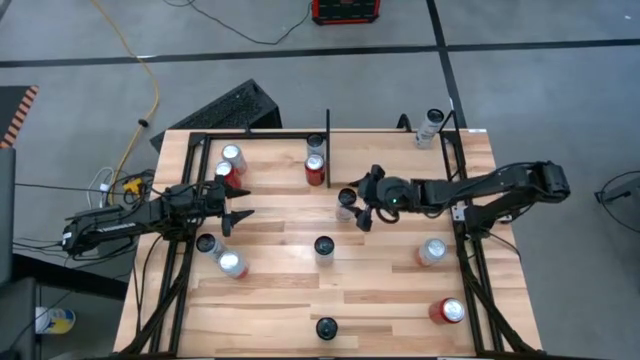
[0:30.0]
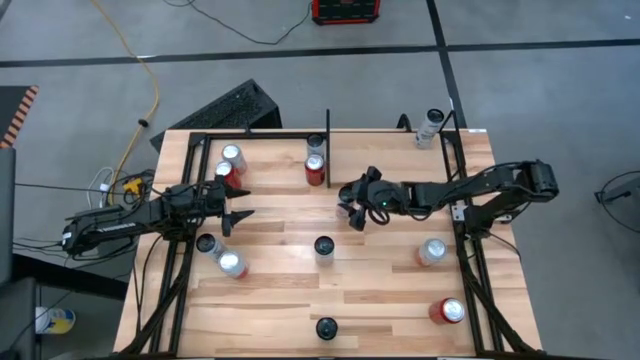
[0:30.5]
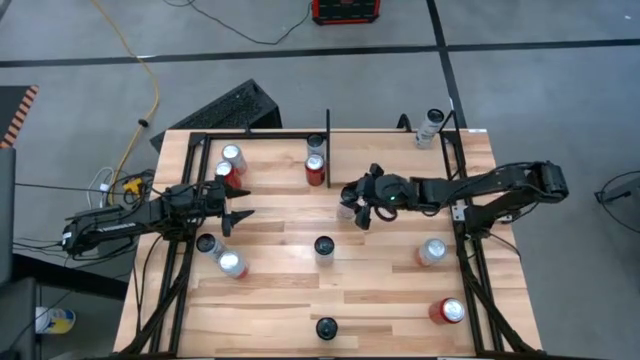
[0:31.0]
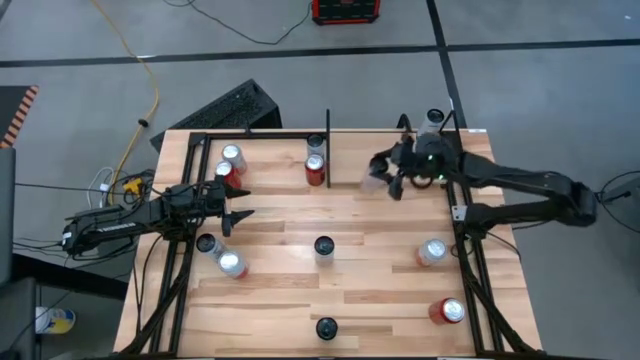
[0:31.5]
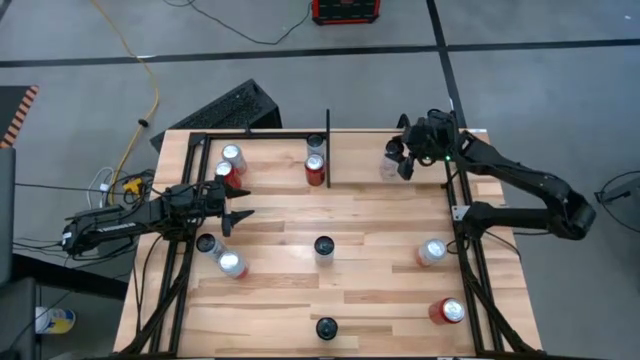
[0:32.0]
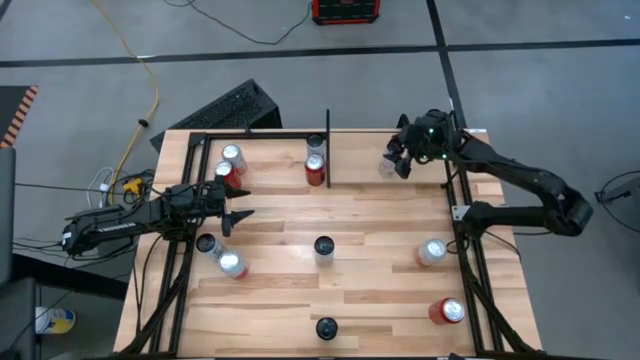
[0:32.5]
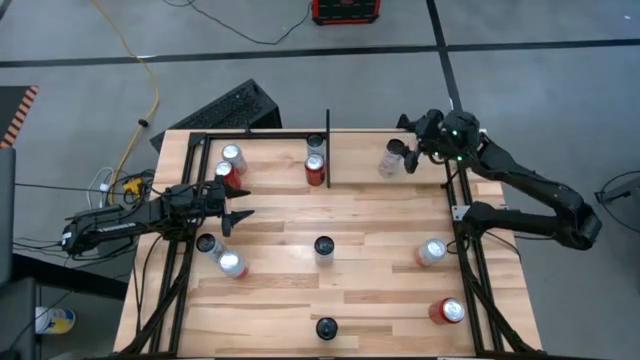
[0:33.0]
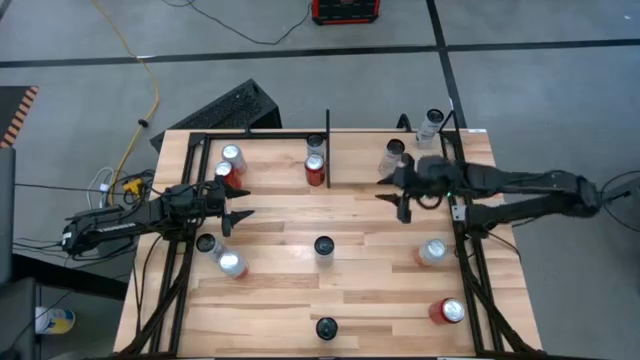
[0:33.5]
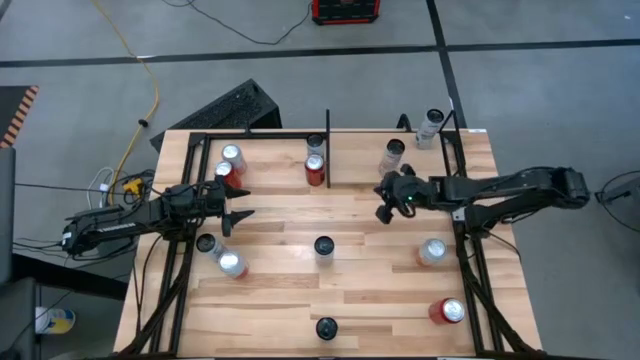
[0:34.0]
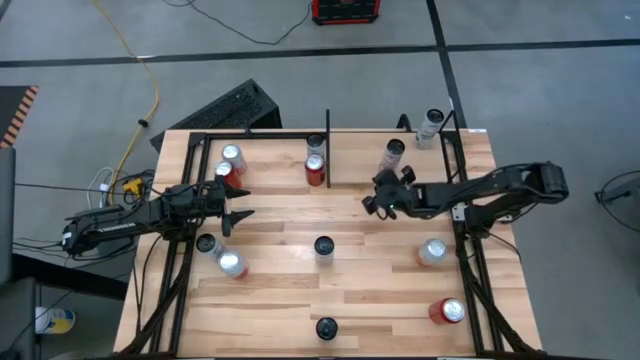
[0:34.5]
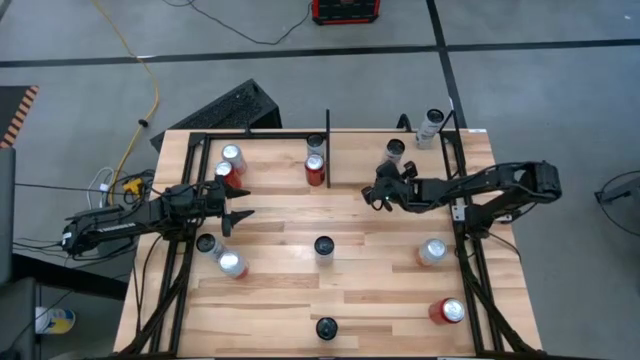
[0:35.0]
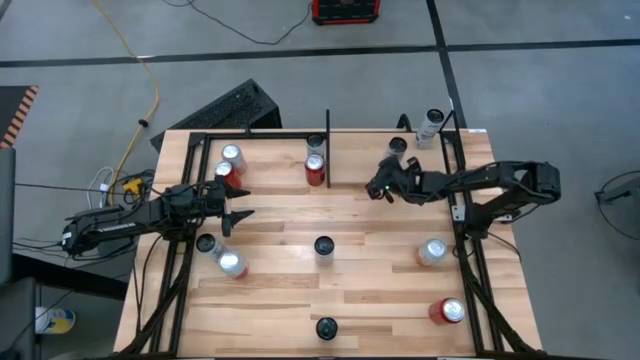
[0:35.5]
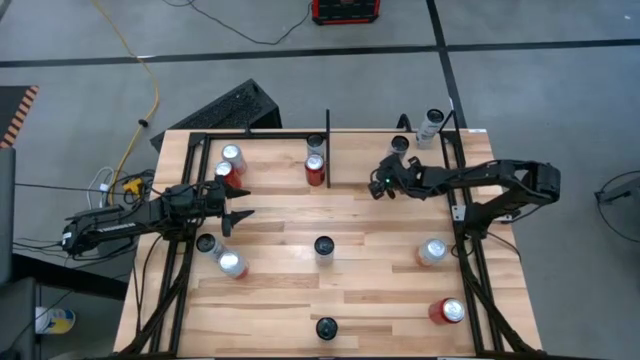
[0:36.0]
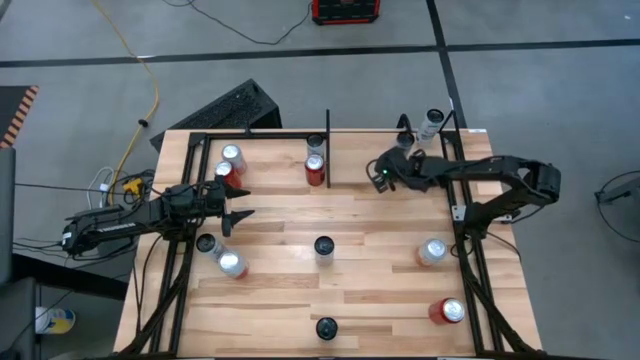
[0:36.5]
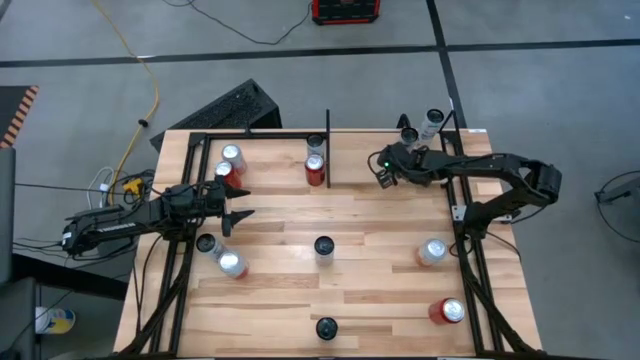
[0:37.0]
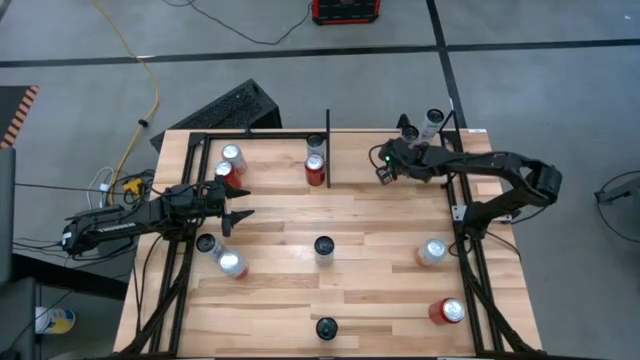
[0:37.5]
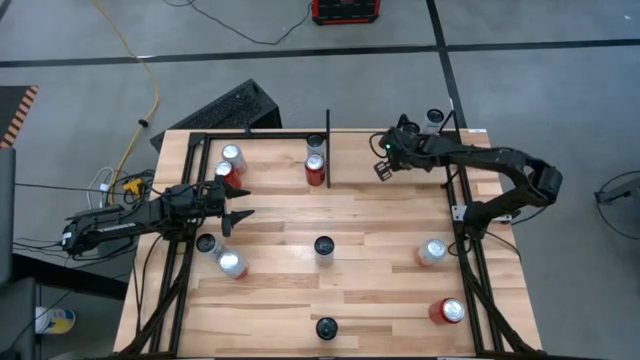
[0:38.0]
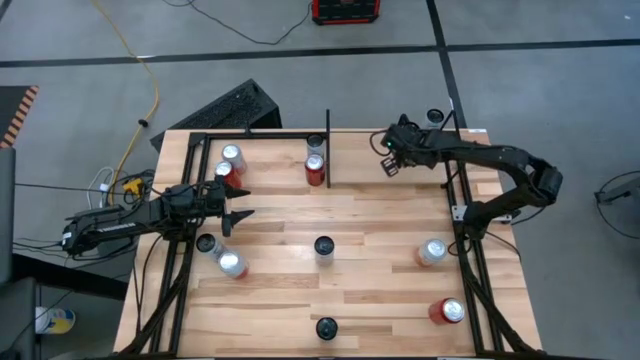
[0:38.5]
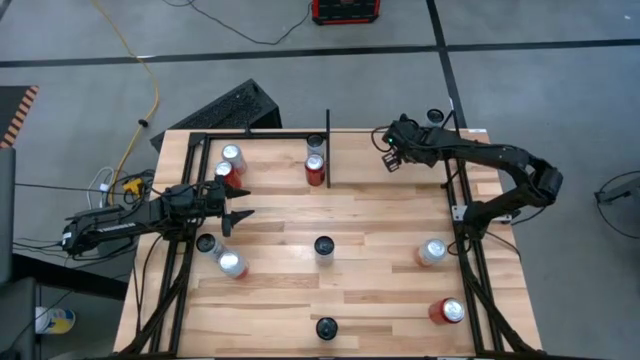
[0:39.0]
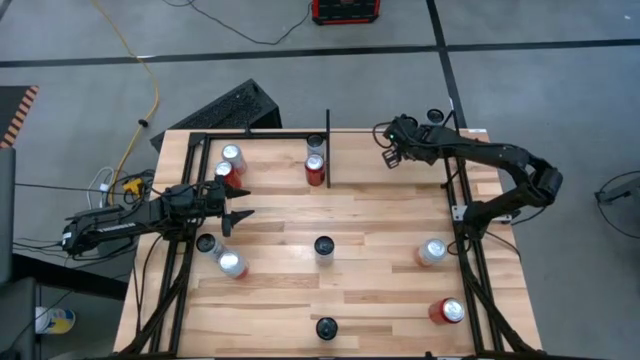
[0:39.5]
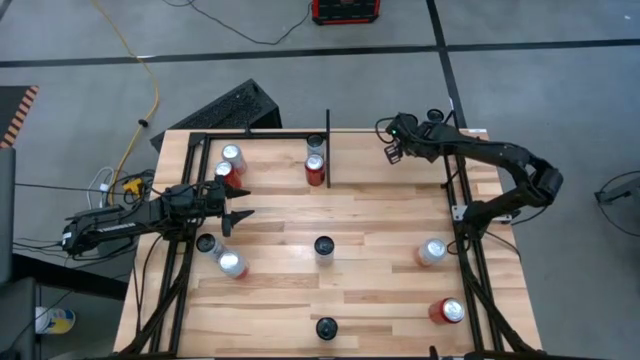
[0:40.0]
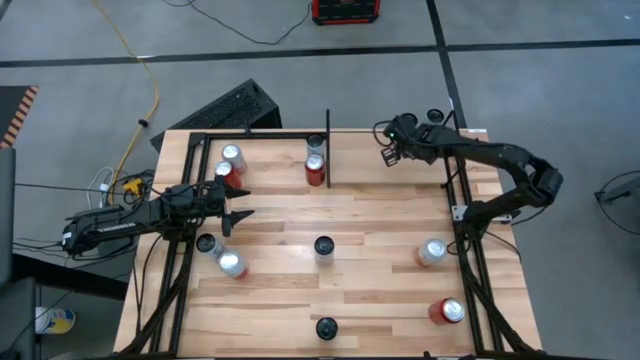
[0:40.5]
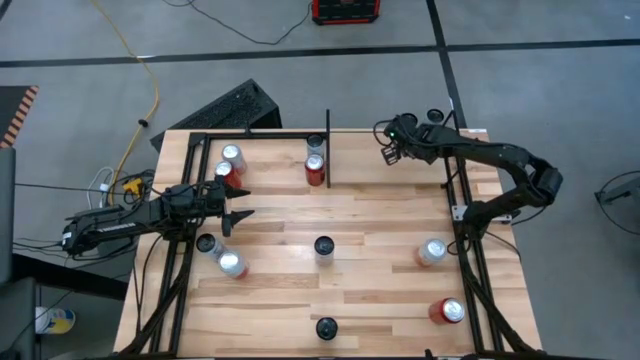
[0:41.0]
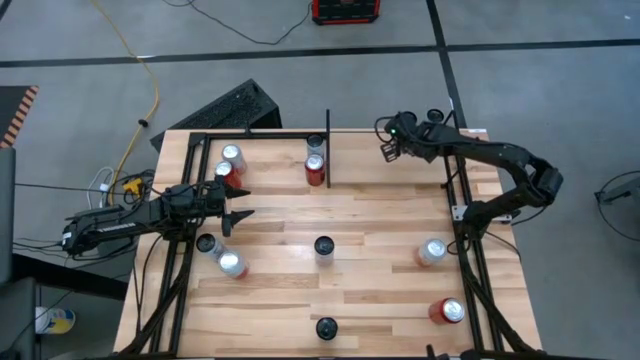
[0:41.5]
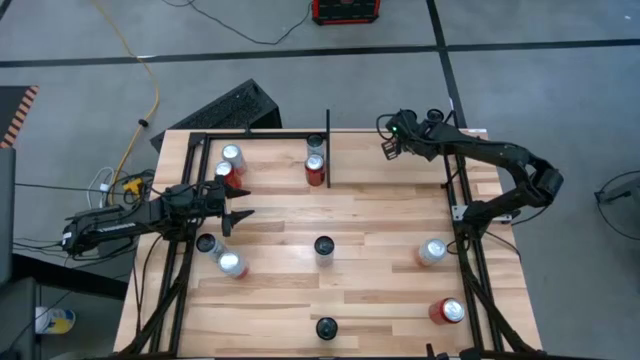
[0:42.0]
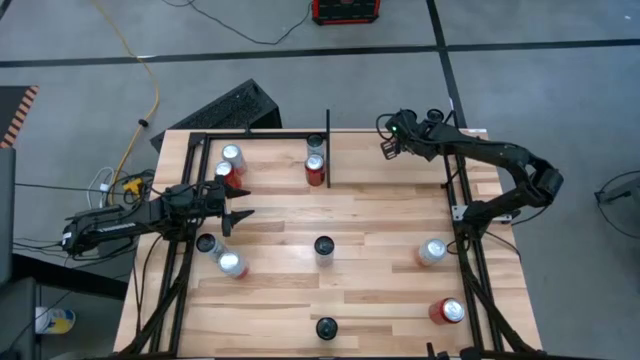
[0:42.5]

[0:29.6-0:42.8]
Task: Place canned beverage on shelf
Put the black pink soda can on the shelf

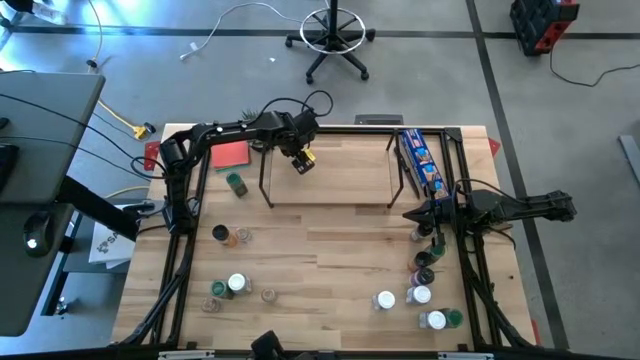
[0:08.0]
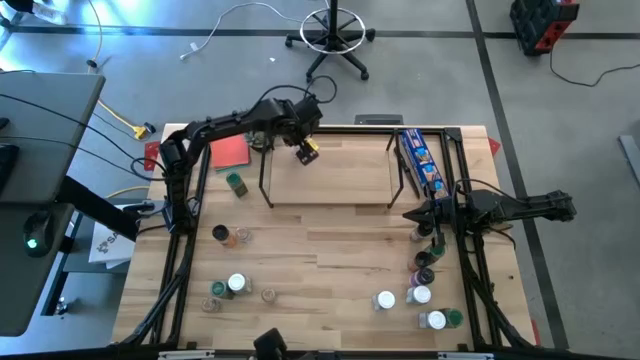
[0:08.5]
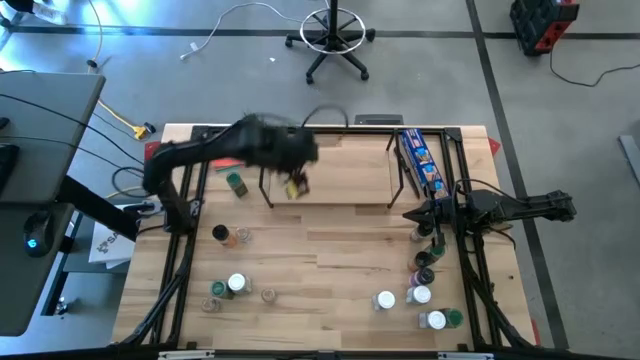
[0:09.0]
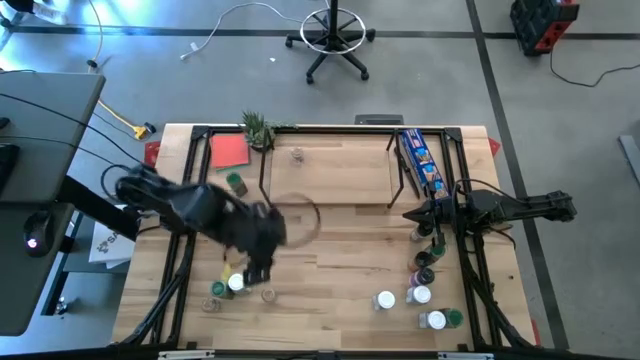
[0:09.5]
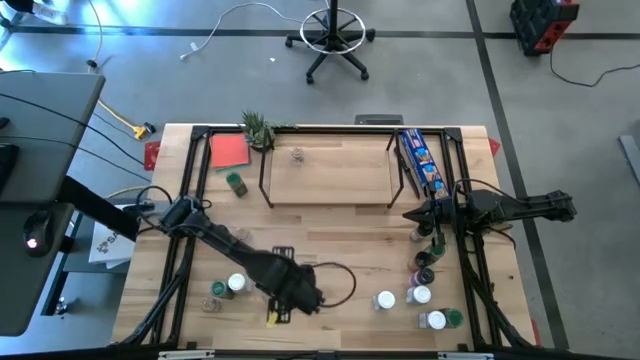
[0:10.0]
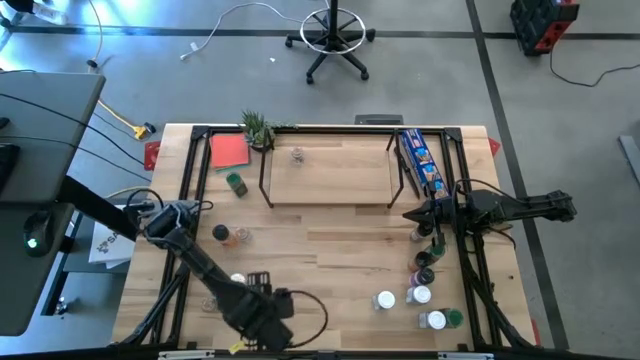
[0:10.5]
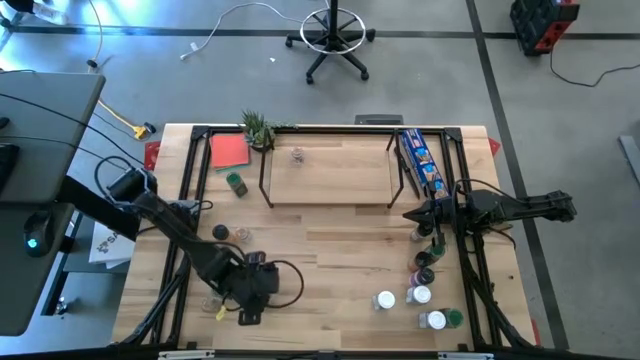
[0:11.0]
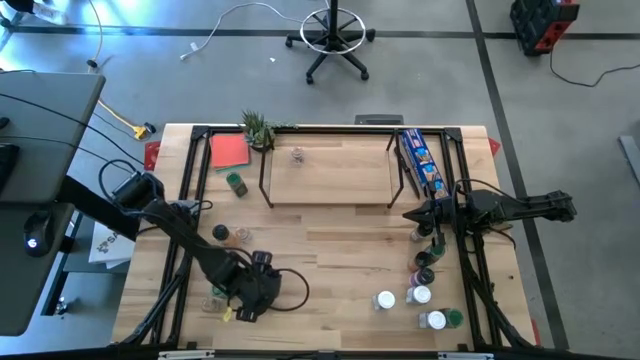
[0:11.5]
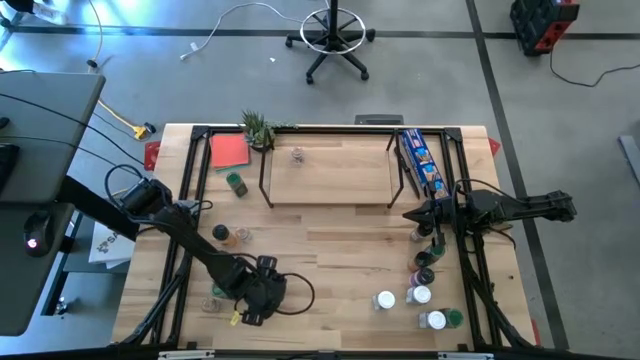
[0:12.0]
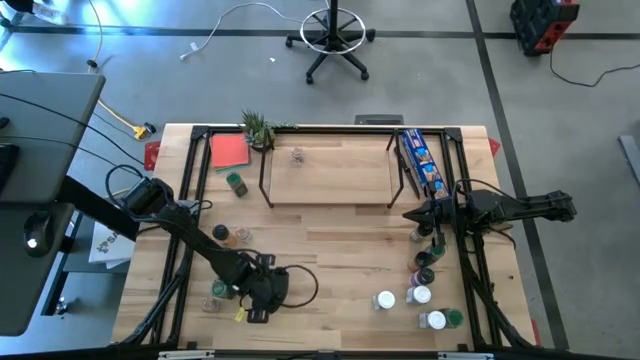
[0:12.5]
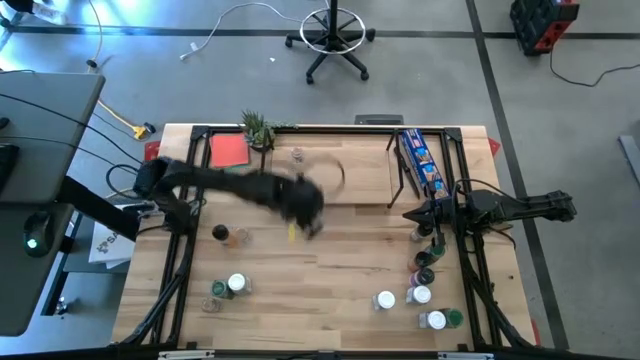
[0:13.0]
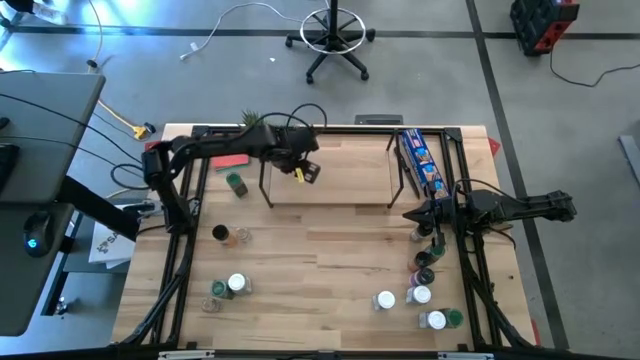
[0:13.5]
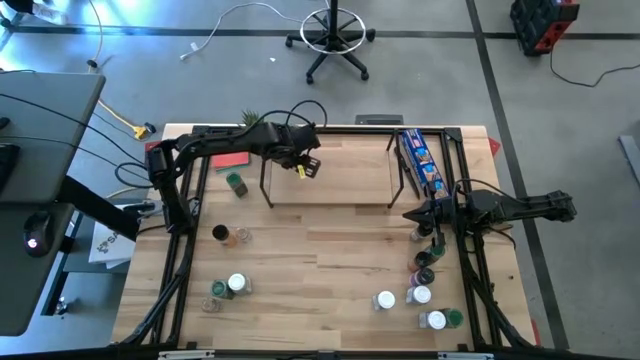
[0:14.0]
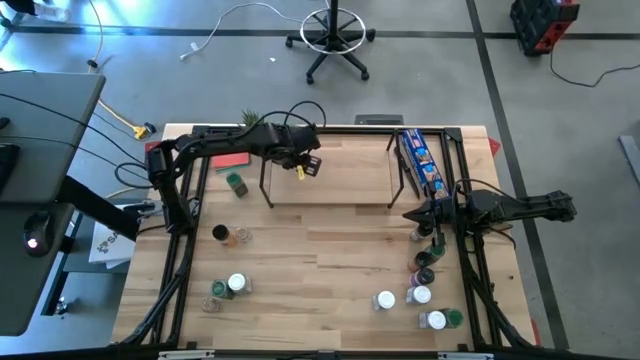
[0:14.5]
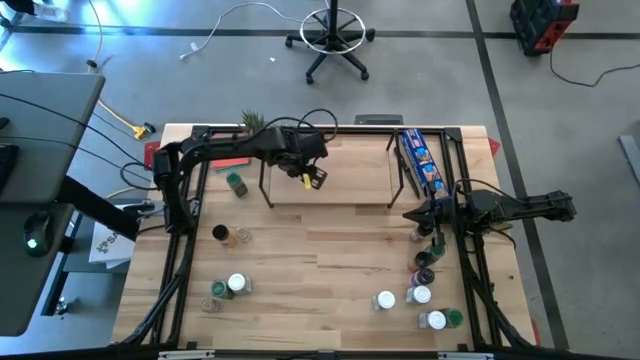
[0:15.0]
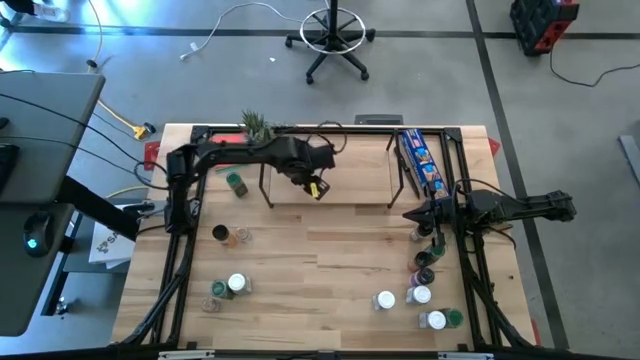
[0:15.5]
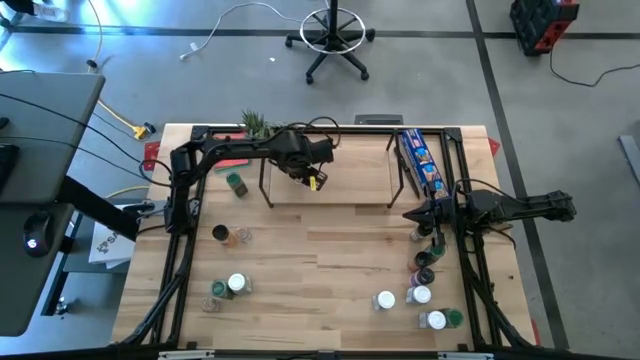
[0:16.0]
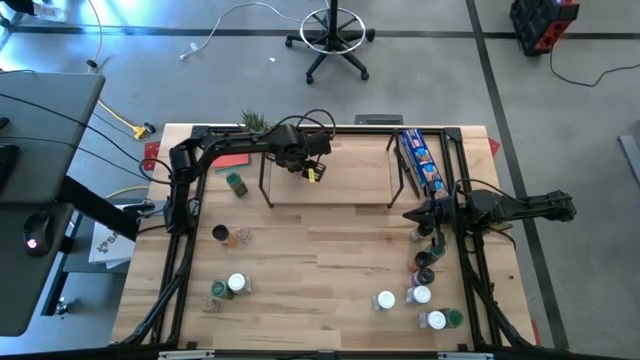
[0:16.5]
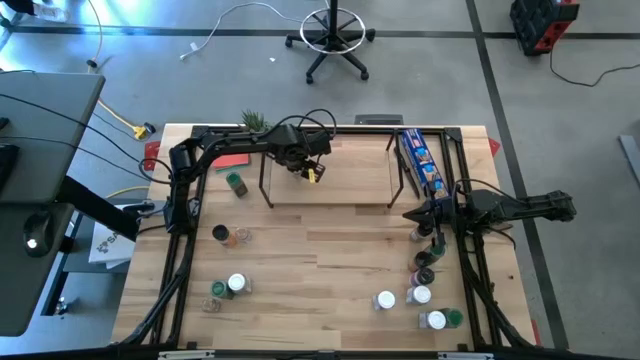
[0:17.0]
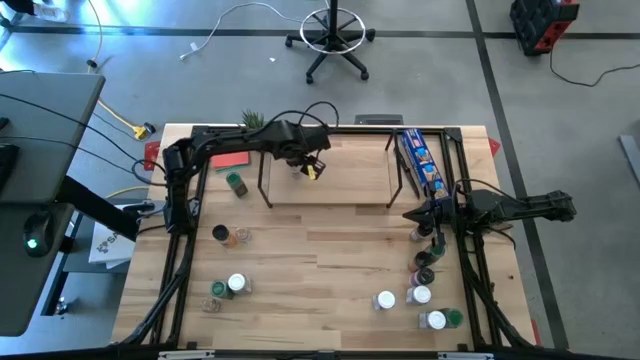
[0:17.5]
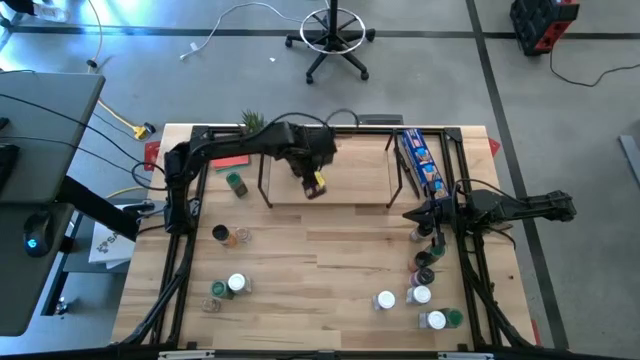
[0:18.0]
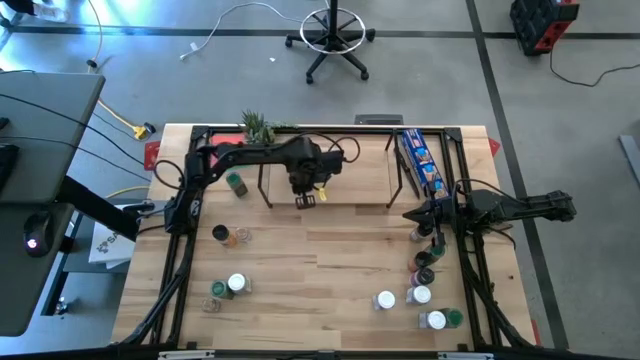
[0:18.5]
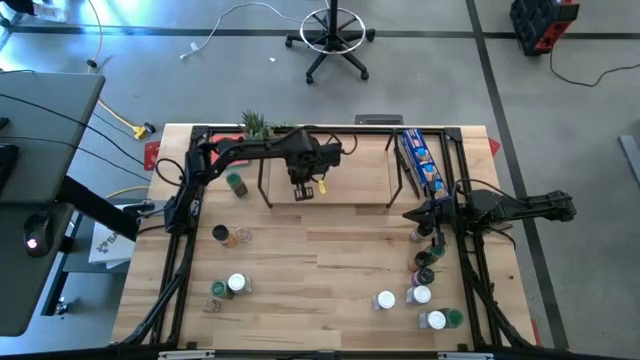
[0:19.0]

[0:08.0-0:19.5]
Task: Shelf spices
Put the brown seasoning bottle aligned with the other brown seasoning bottle on the shelf
